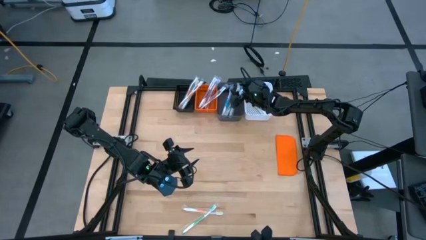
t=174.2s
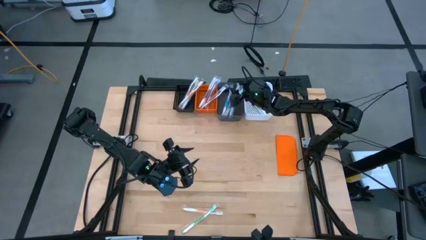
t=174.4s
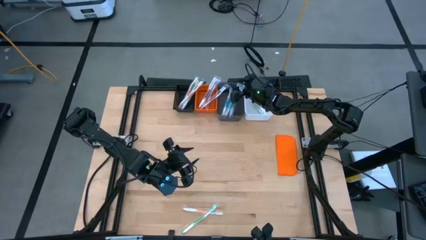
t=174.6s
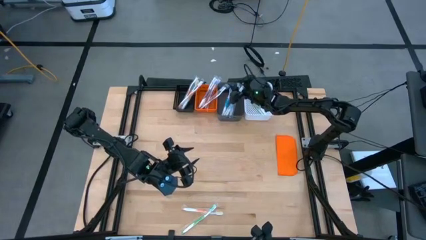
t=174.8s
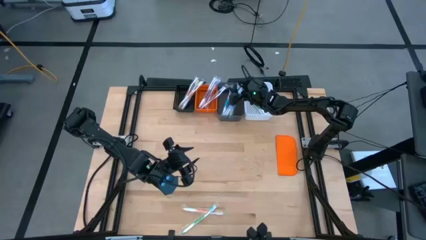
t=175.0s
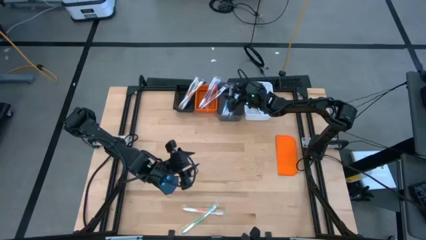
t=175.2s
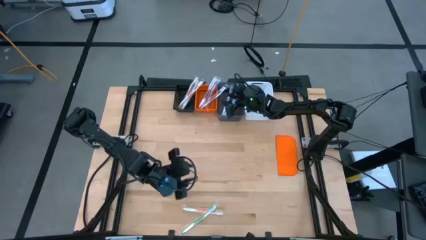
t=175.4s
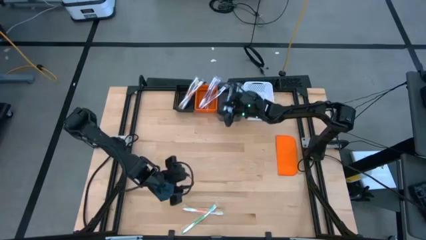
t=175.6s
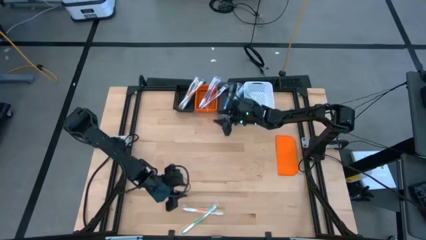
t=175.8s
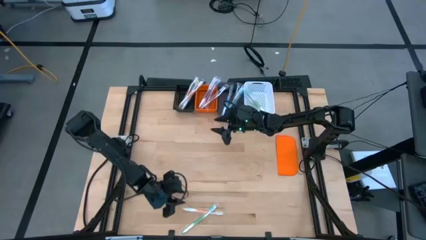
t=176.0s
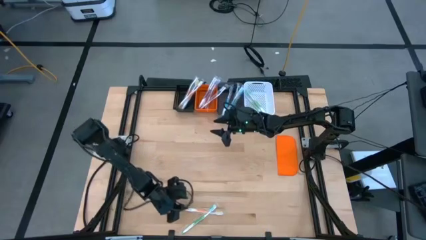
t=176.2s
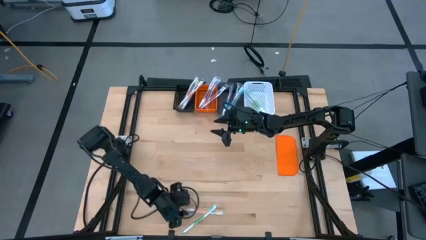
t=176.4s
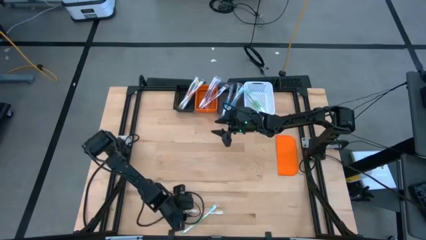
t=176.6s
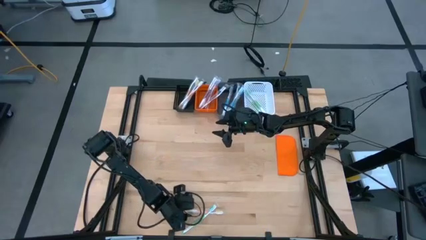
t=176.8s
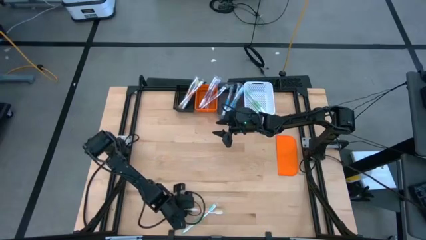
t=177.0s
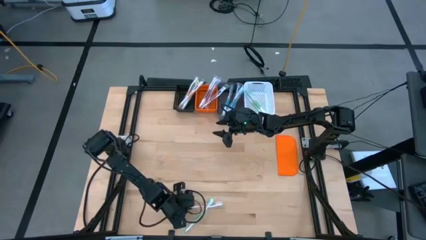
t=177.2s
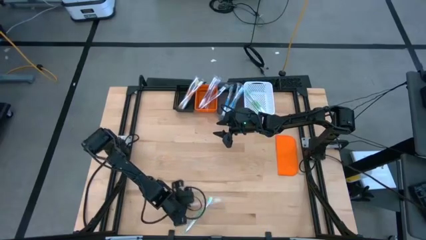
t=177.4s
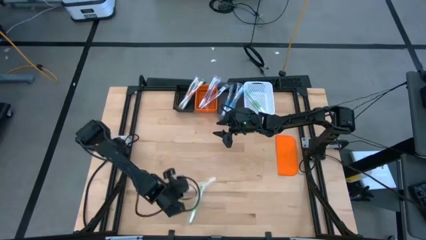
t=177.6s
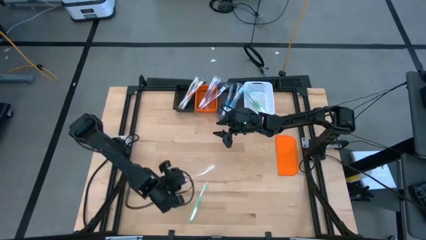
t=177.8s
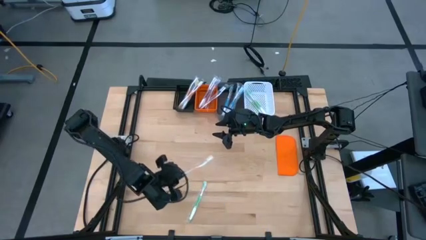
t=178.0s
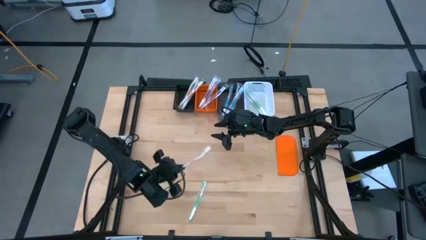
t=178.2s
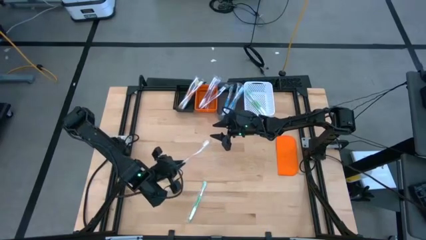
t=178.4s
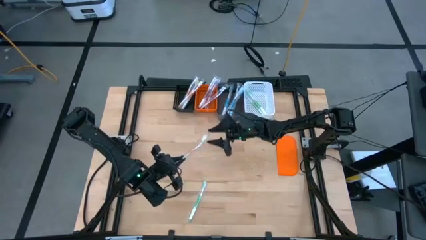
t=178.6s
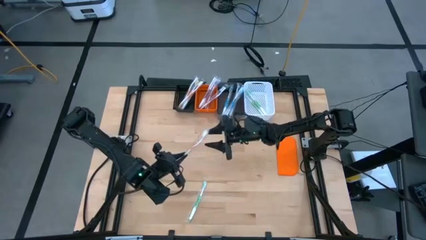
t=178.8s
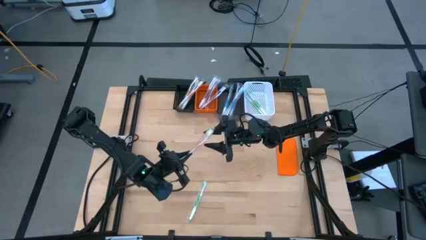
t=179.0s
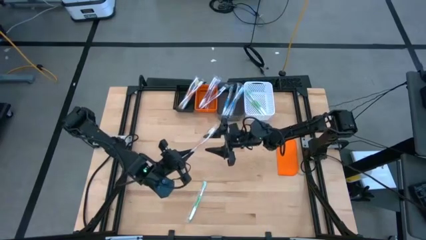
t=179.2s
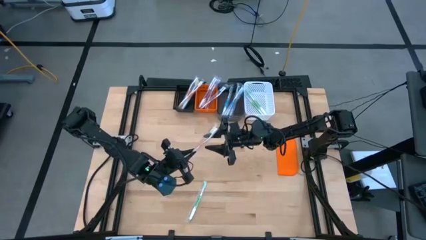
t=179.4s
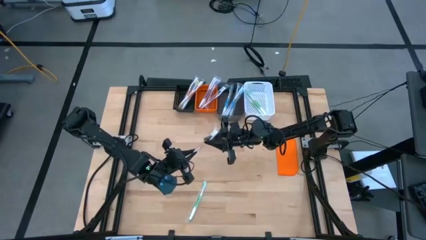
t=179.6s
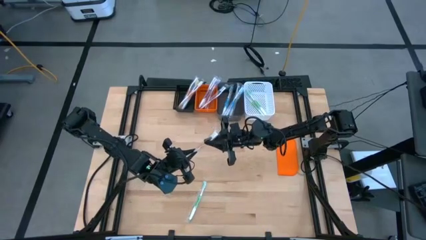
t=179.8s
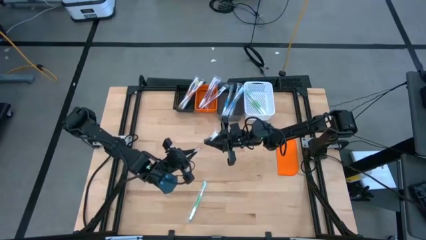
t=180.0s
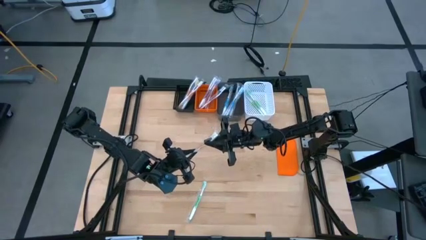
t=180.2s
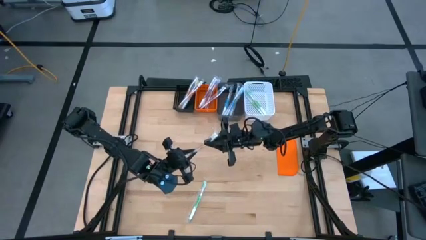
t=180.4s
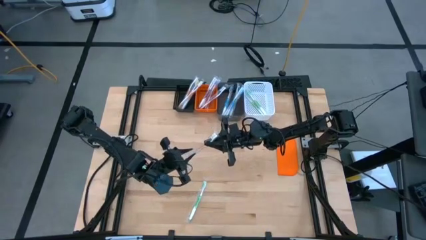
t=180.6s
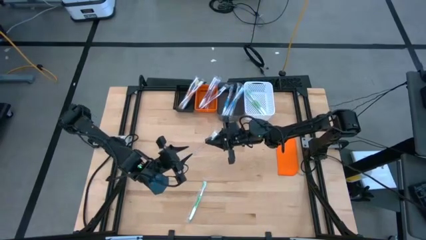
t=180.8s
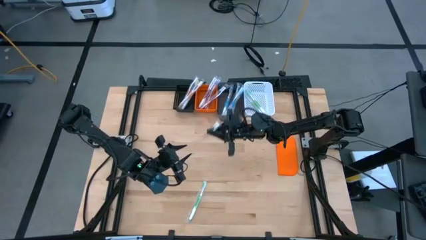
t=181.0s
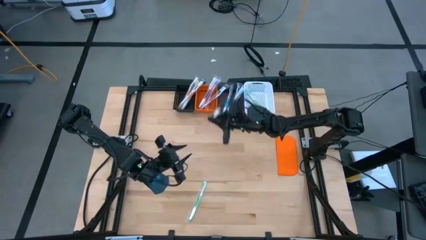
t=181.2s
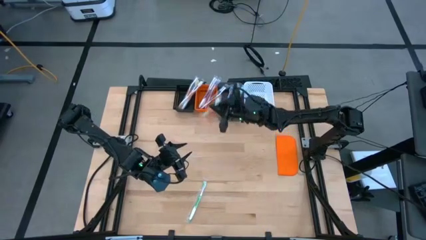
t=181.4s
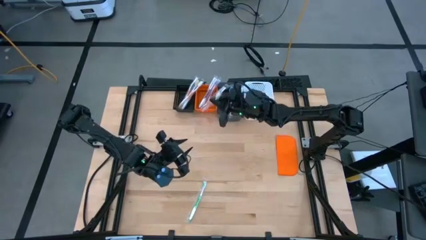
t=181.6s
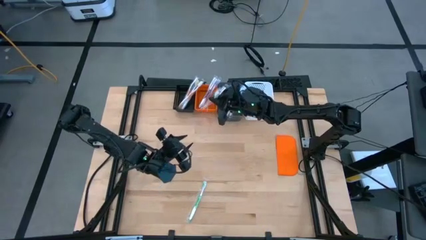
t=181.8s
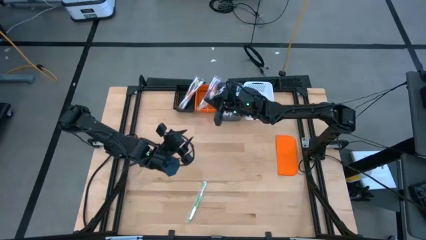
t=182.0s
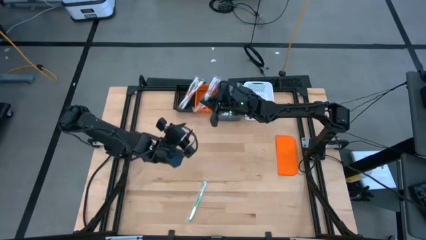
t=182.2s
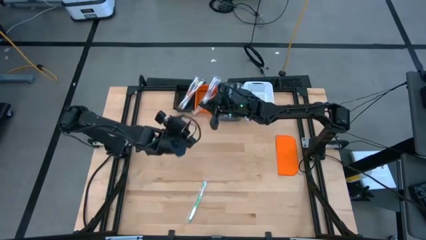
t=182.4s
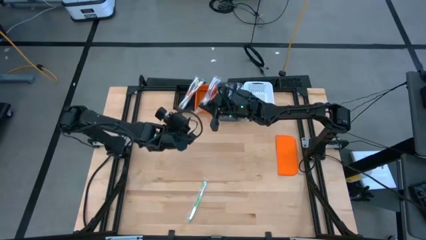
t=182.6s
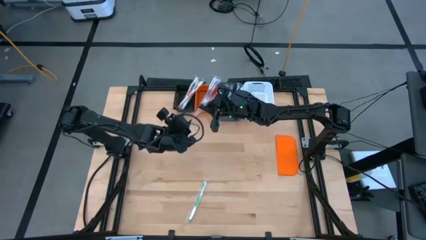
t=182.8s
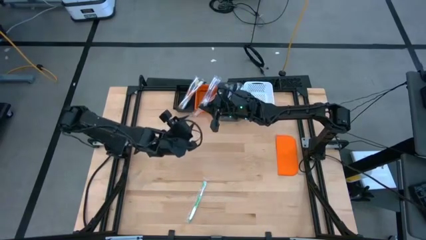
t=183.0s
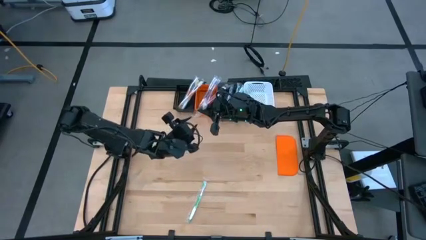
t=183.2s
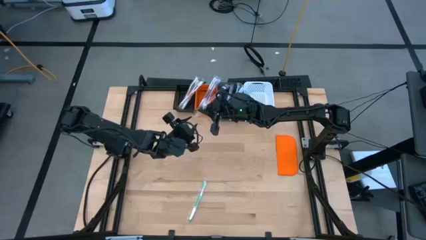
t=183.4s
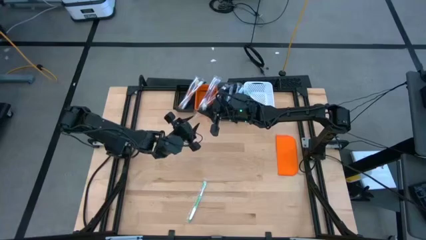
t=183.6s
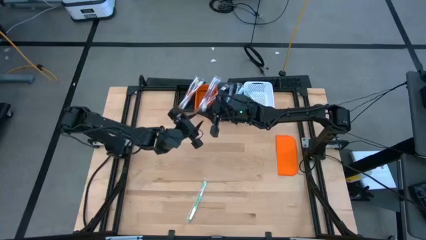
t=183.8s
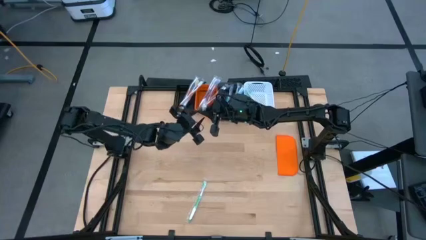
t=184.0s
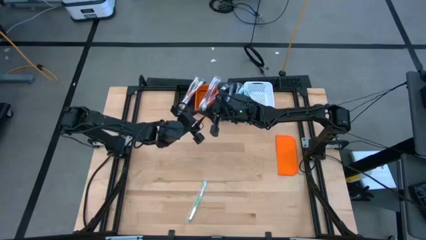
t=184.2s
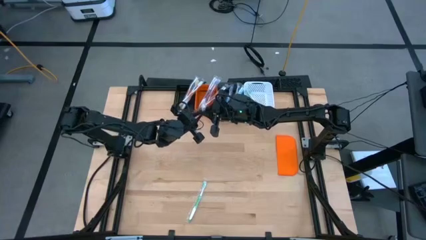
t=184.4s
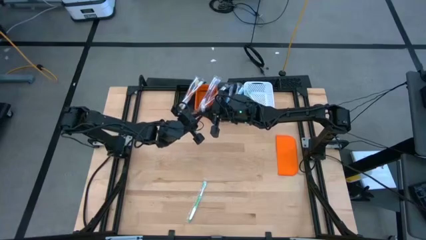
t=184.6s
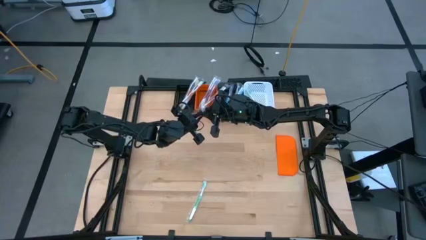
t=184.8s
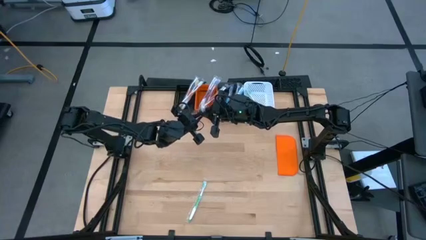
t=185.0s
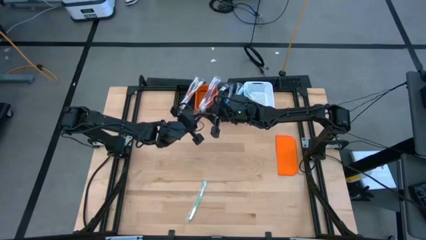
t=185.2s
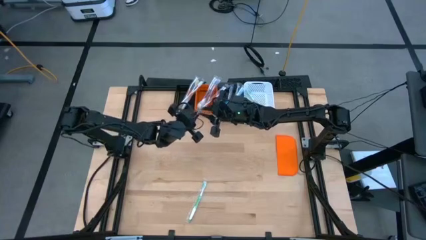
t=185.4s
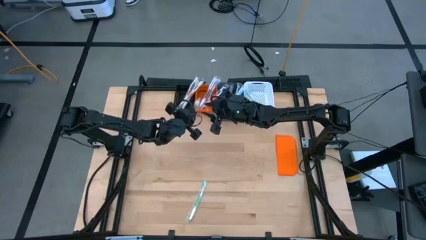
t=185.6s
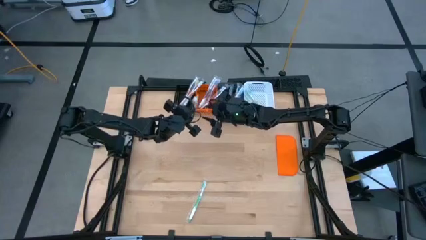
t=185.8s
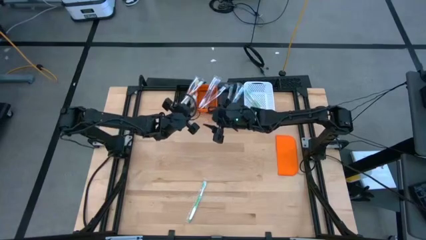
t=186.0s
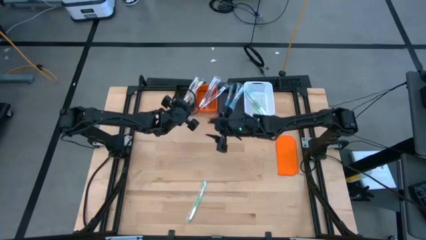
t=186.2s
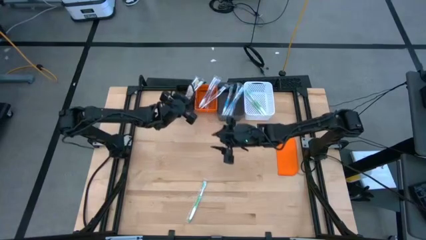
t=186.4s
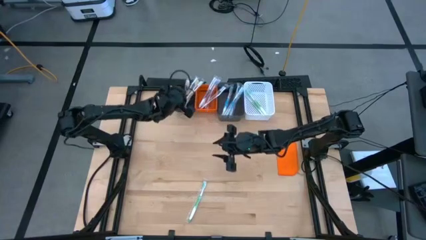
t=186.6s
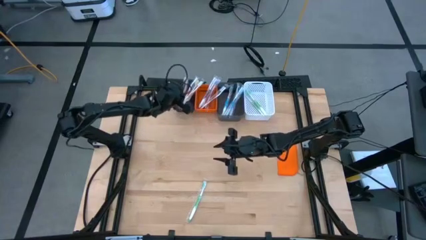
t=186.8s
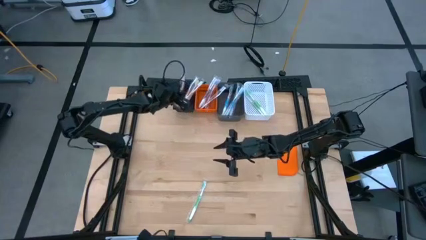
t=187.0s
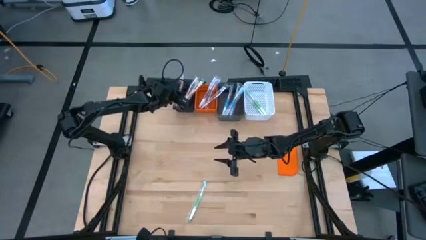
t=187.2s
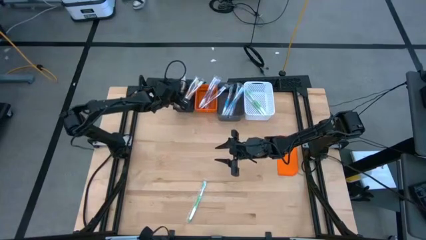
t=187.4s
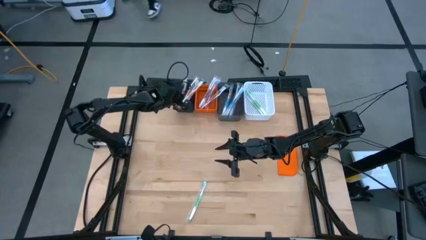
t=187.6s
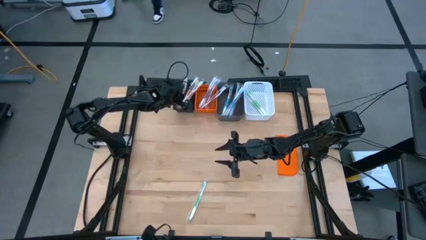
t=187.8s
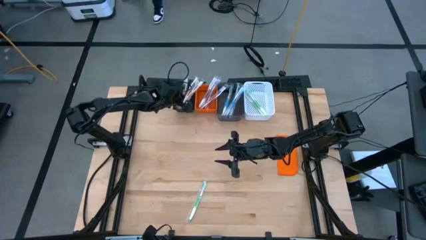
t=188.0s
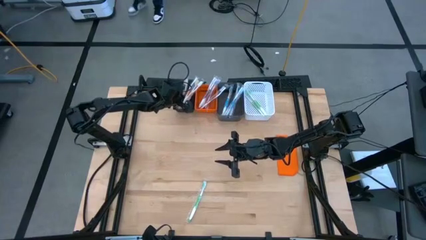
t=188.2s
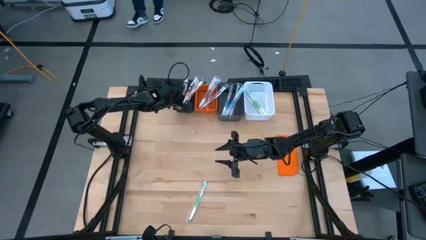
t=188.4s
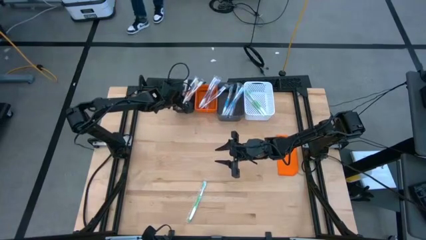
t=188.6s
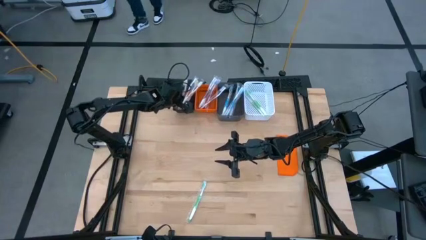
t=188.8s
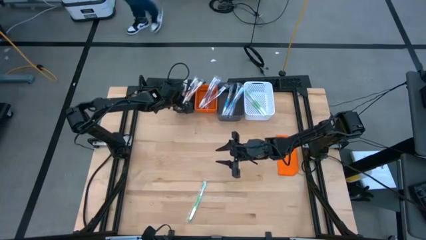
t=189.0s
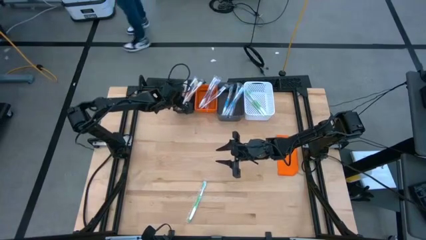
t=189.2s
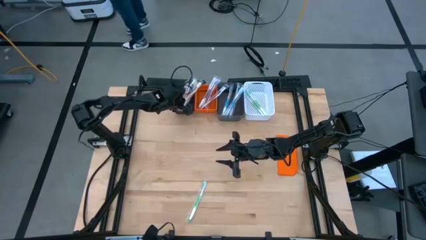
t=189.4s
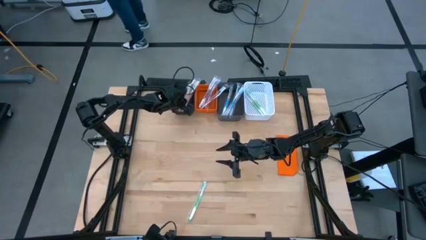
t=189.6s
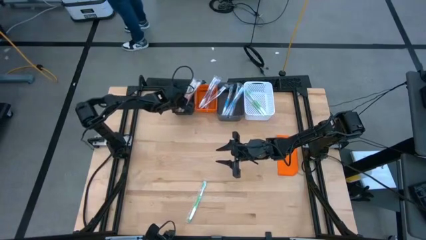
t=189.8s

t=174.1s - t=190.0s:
Task: Pick & Place Toothbrushes
Put the orange toothbrush into the black bin

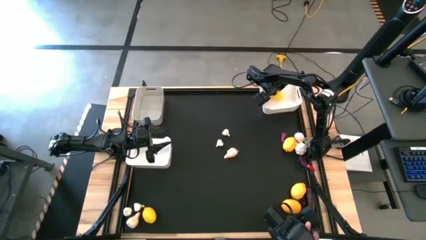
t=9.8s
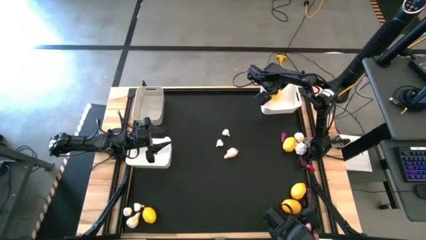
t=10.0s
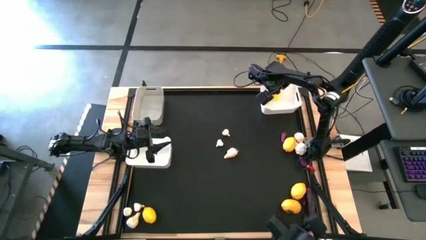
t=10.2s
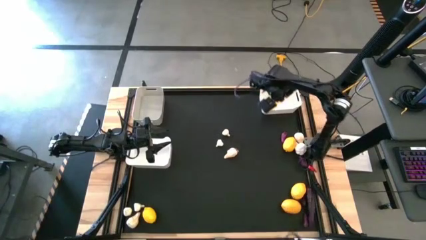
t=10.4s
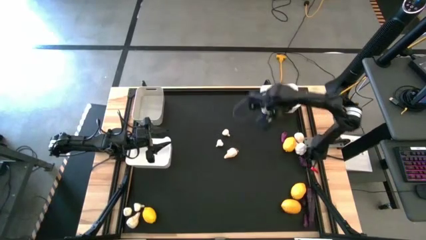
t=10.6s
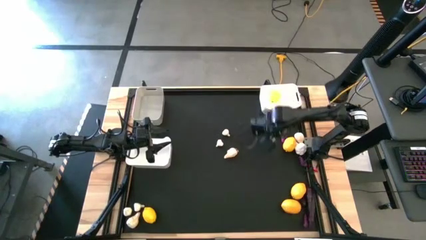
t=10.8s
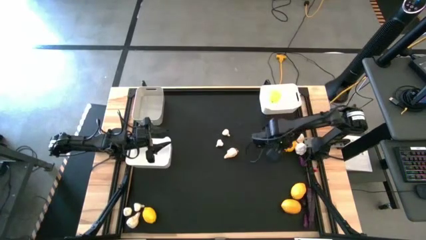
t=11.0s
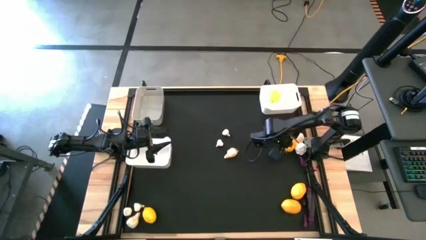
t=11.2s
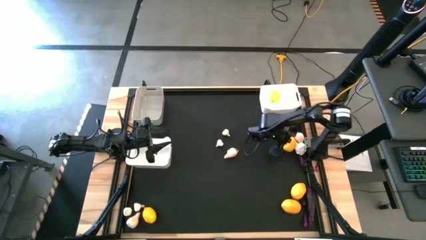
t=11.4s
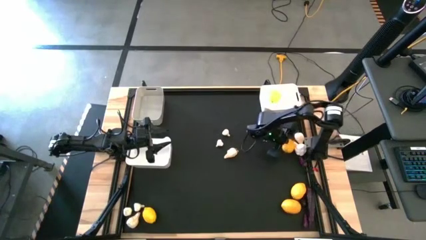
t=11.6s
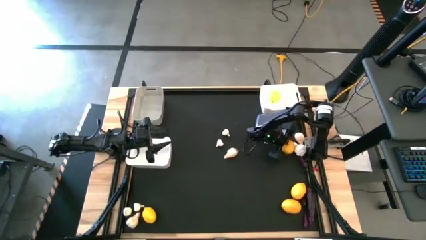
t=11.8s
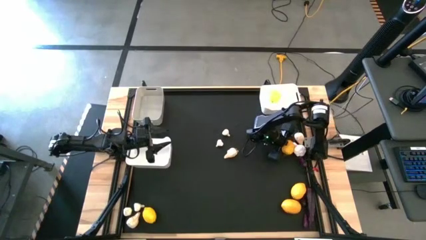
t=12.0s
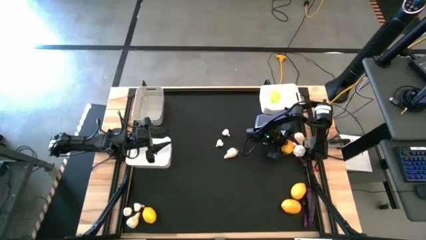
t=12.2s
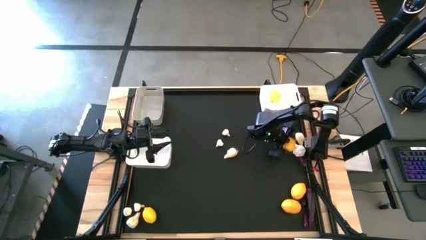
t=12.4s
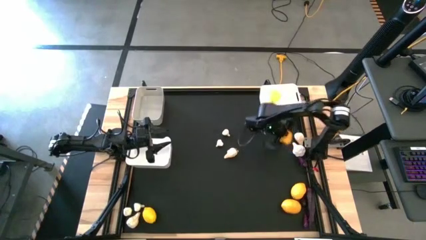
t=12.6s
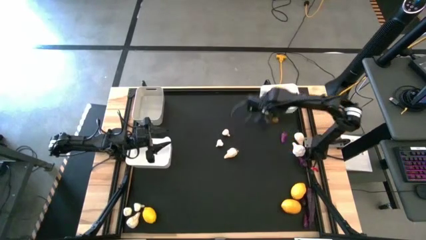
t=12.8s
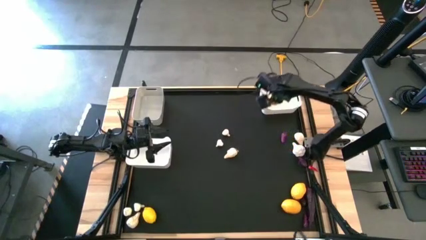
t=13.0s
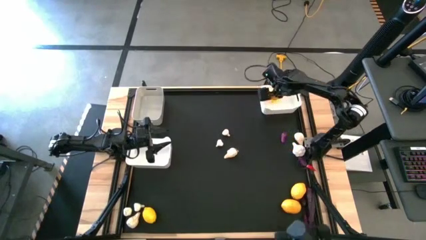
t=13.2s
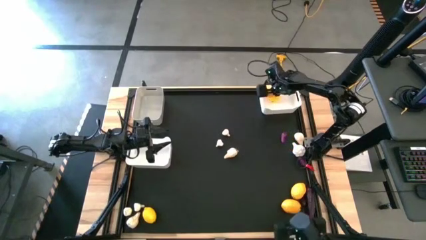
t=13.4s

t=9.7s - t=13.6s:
Task: Sort produce into baskets
Put the yellow lemon into the top white bin
